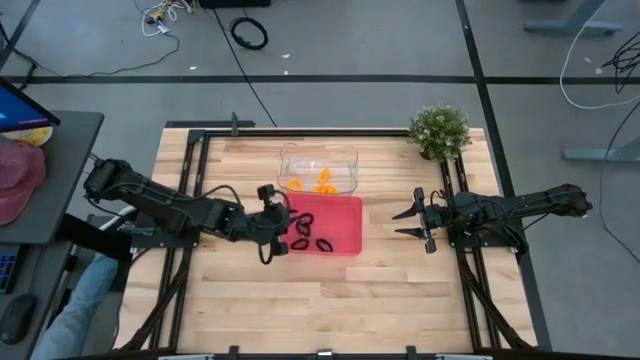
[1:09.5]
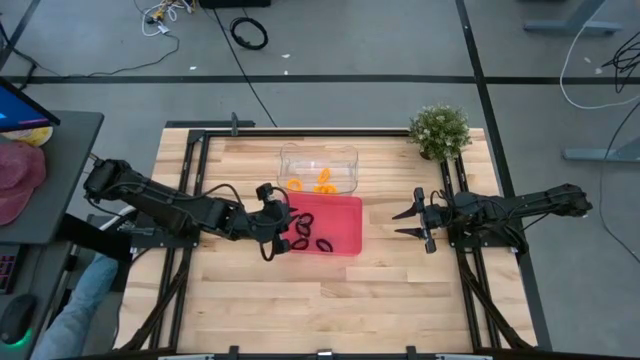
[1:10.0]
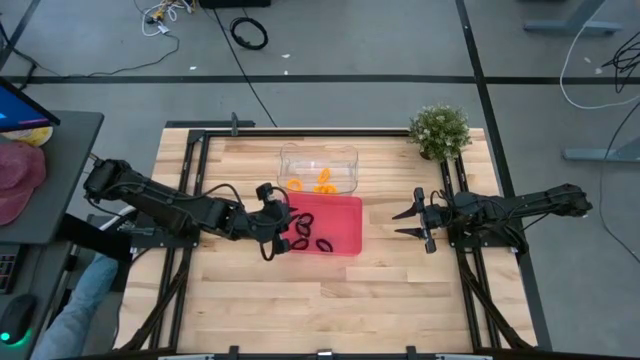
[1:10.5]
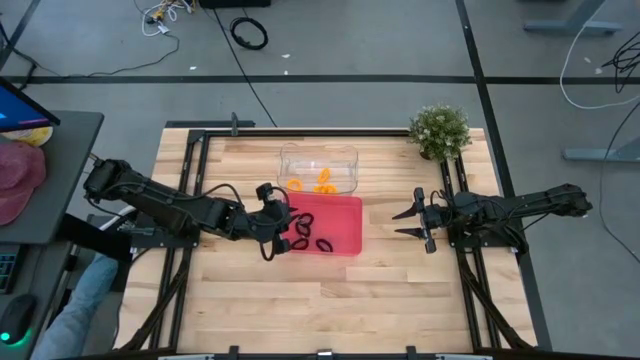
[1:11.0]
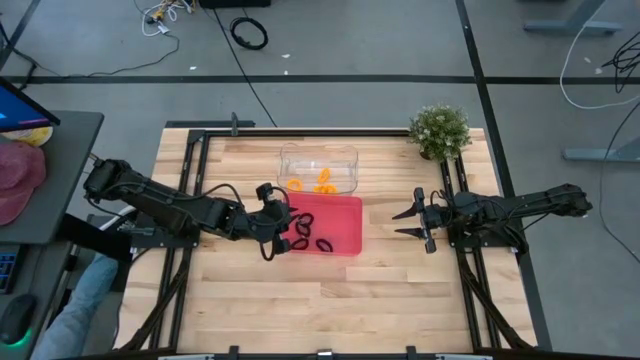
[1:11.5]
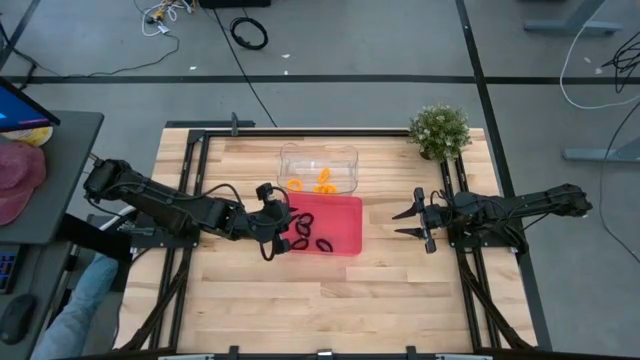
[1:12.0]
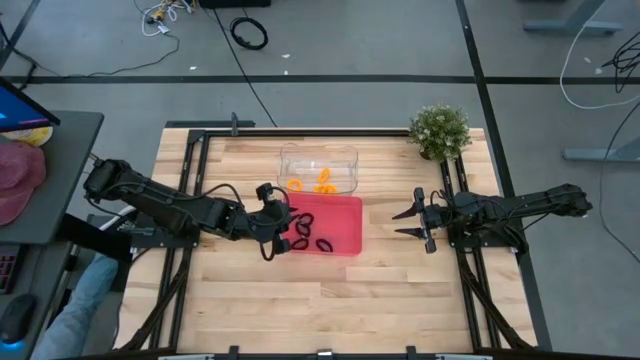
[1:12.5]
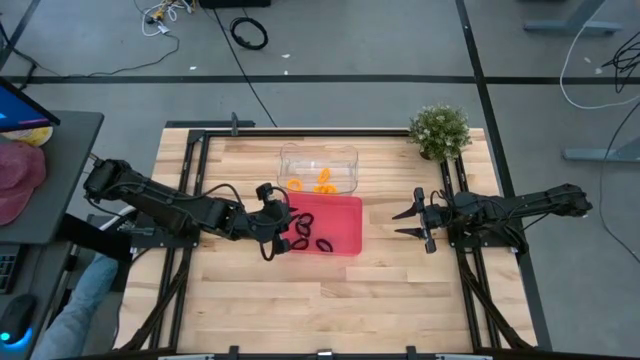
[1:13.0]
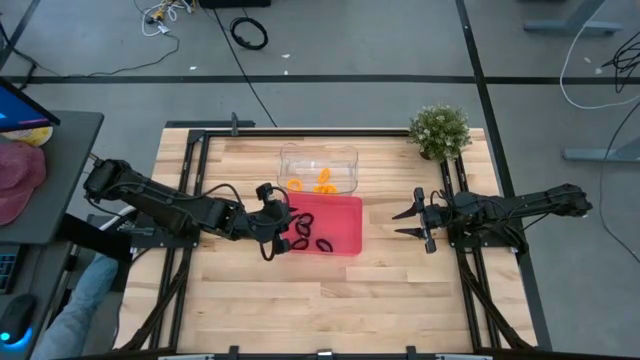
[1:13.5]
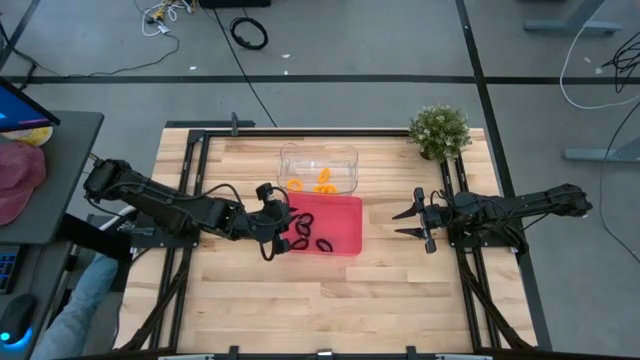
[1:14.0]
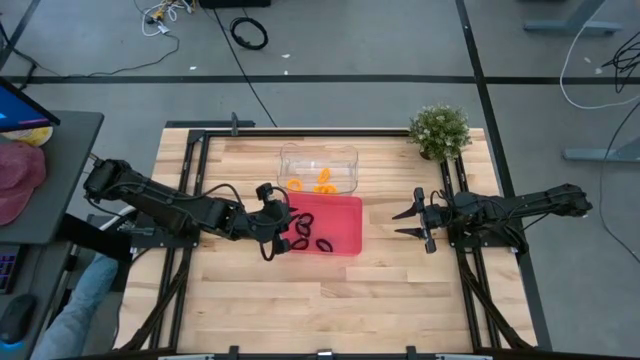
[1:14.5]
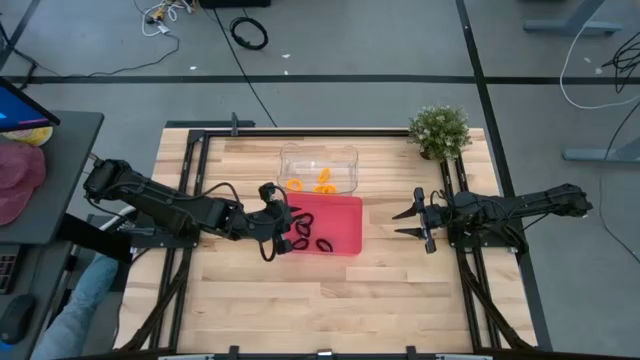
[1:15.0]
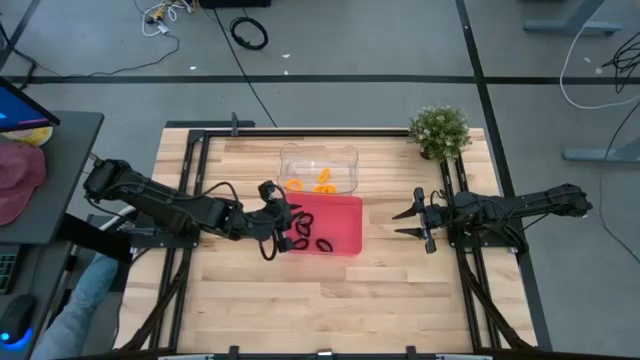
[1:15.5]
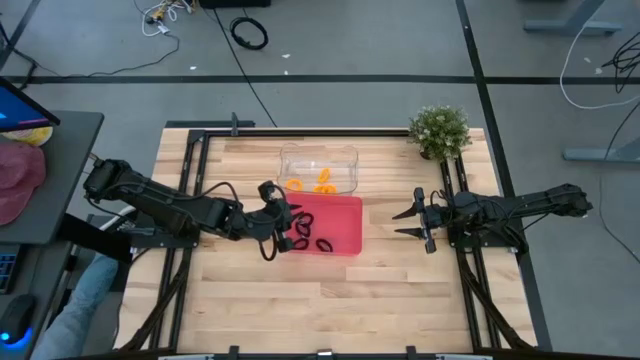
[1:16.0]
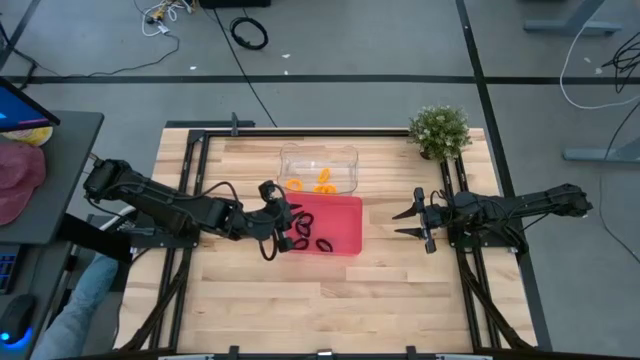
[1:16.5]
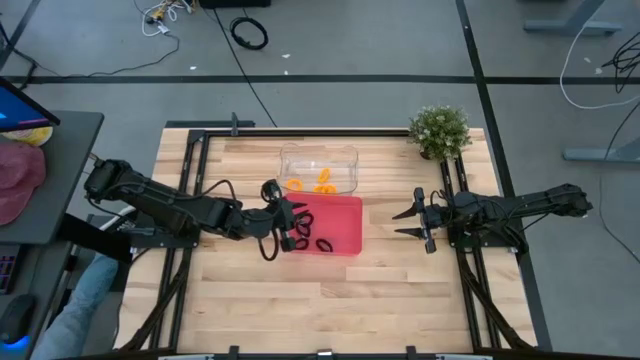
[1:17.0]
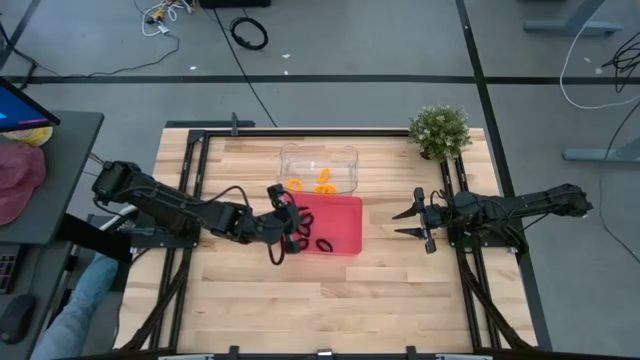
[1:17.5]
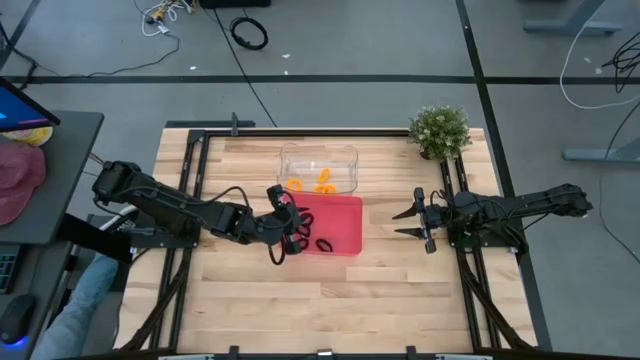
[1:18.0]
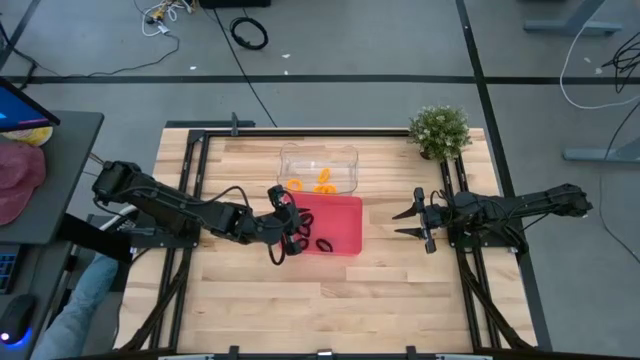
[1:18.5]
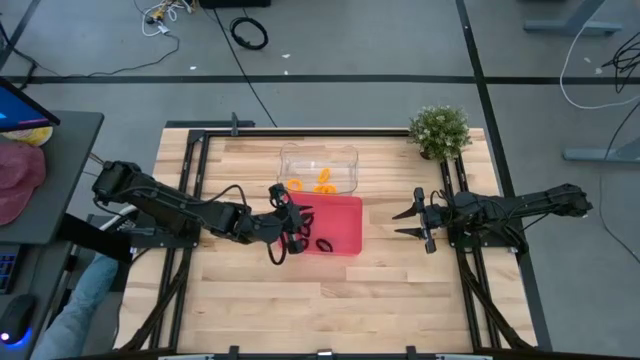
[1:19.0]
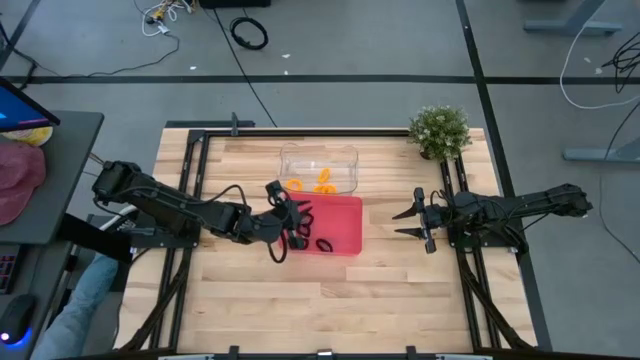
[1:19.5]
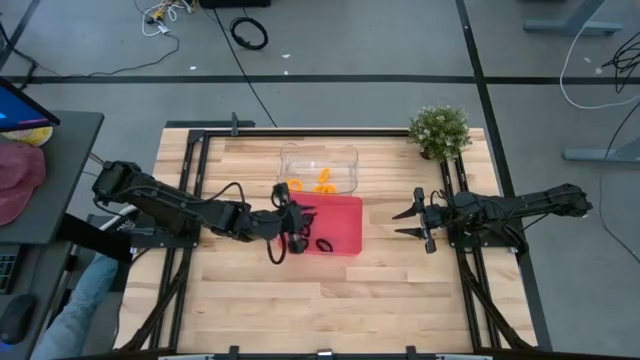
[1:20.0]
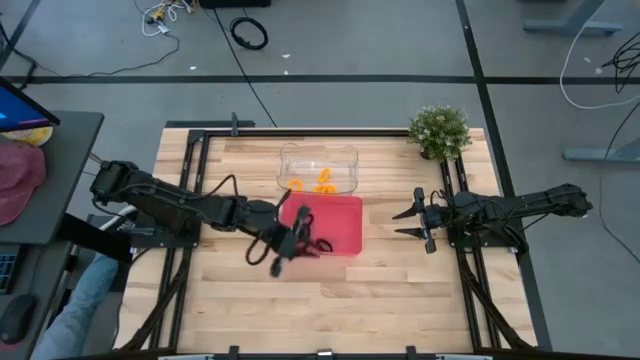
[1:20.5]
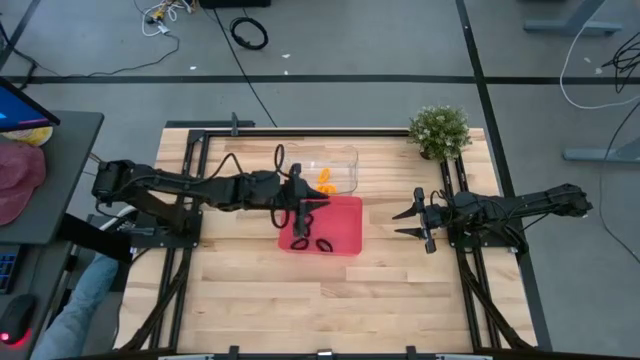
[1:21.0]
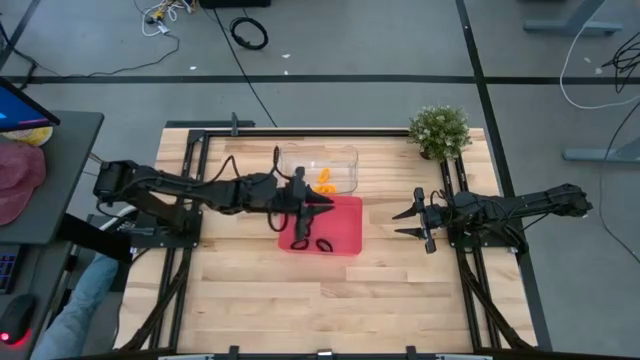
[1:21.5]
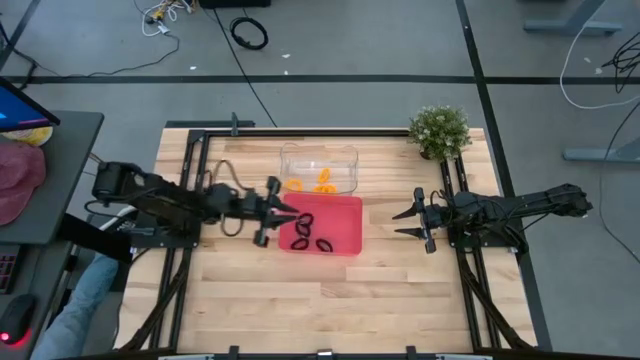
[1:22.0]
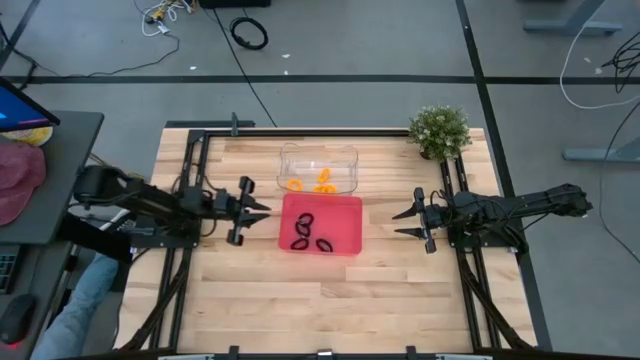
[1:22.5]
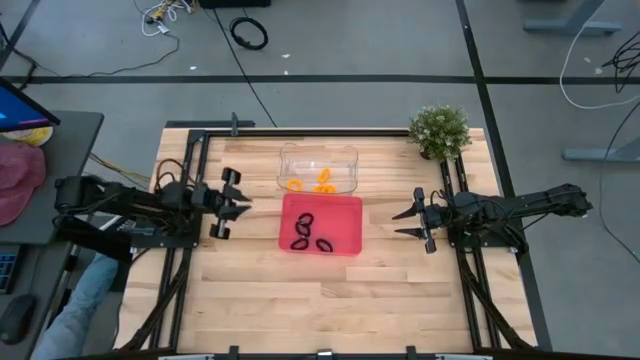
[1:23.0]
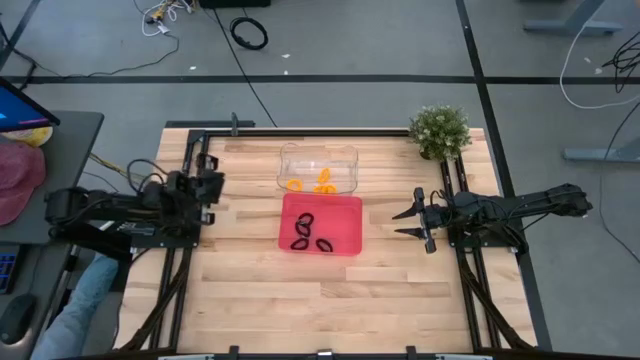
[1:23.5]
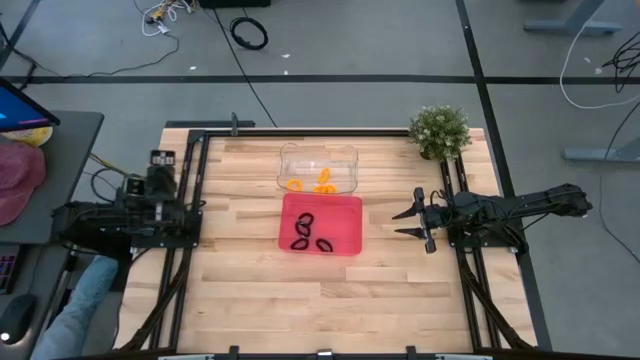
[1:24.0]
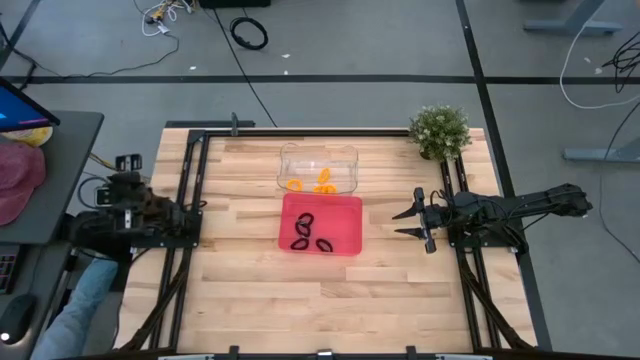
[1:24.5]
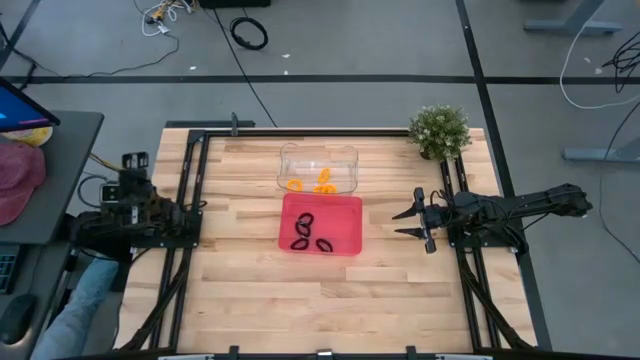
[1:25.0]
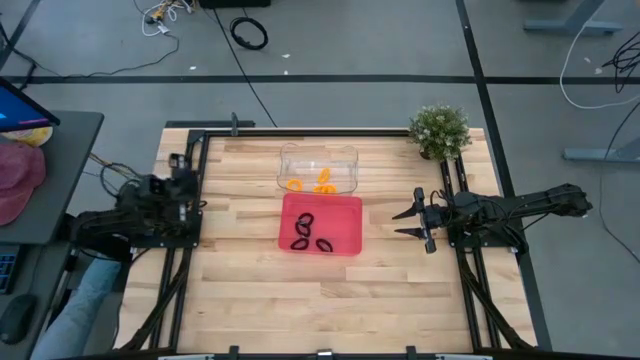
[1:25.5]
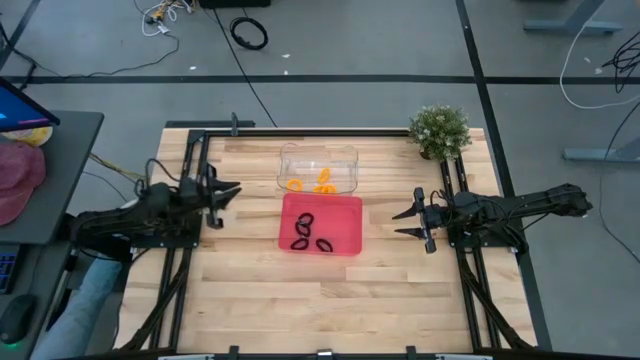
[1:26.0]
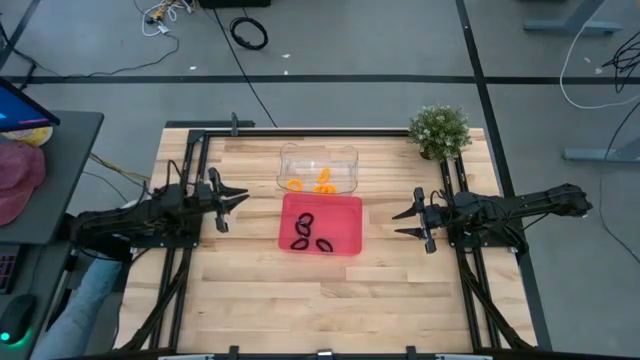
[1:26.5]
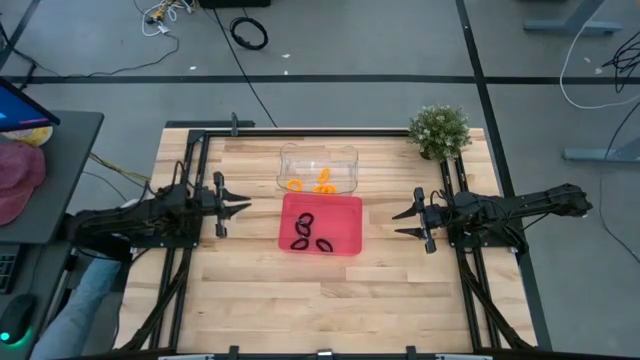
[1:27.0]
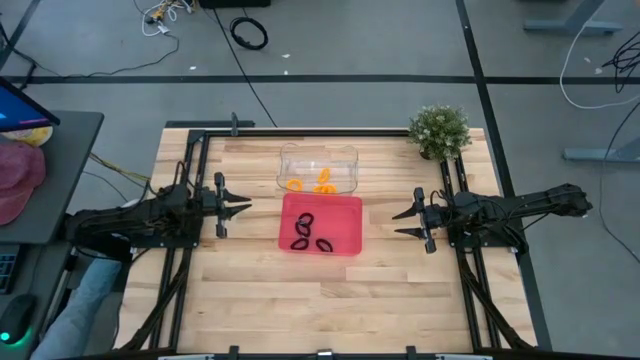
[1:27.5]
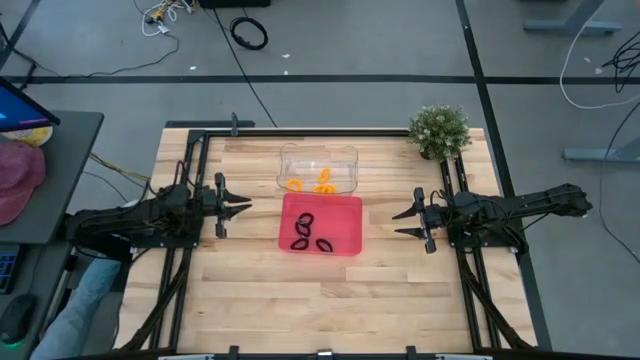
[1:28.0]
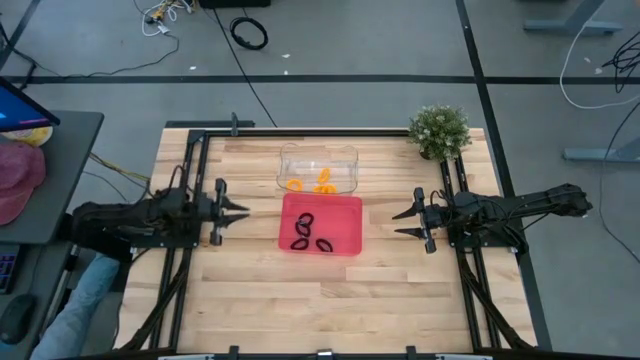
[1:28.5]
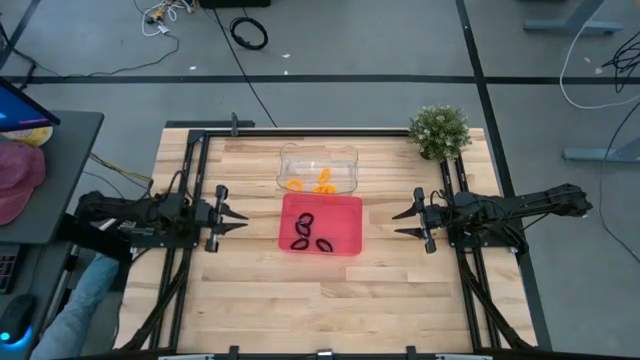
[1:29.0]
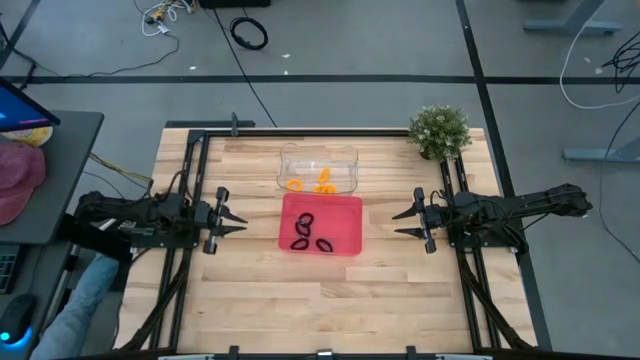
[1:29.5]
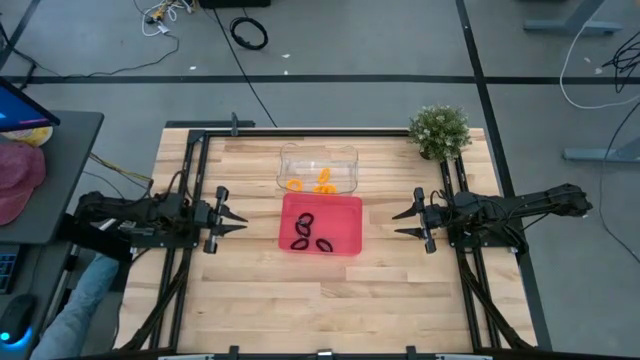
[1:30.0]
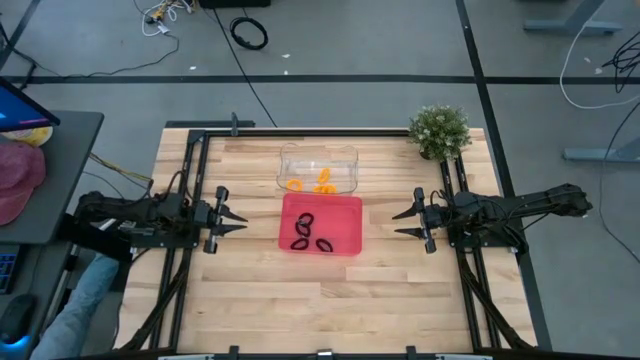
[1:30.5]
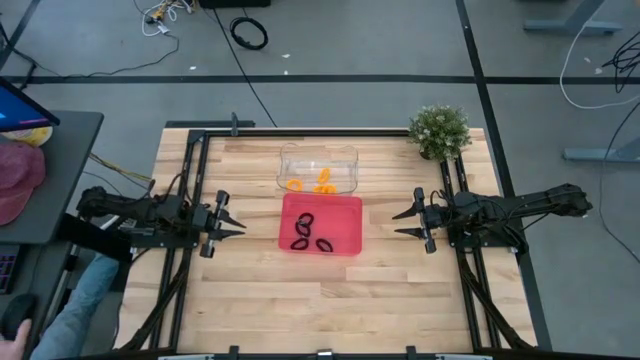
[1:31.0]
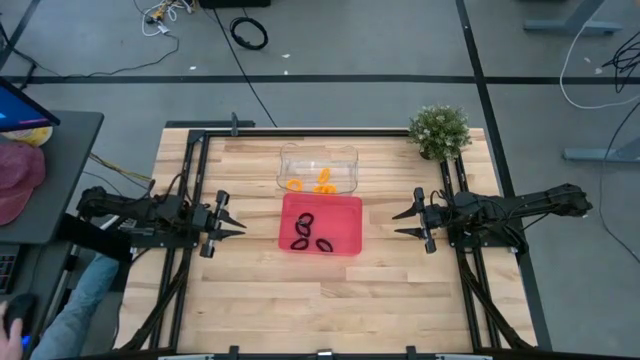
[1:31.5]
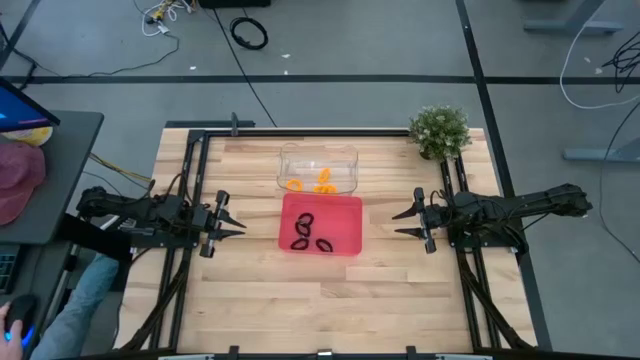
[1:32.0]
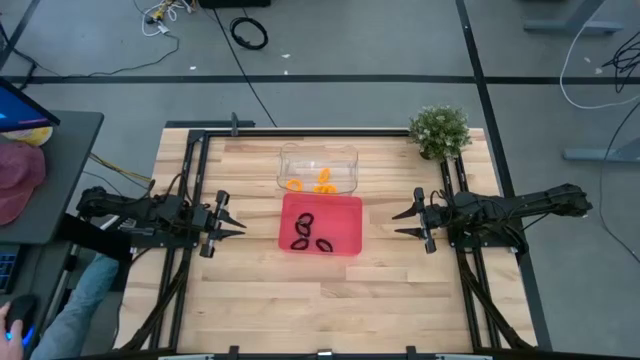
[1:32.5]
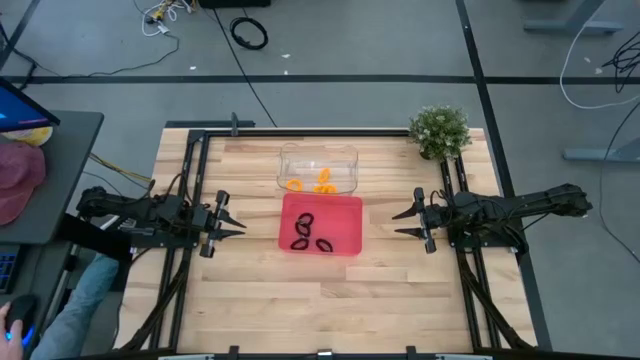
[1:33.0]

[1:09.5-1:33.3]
Task: Sort spring keychains
Return to Home Position
